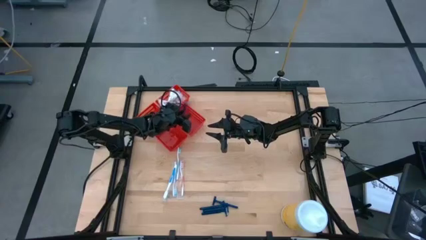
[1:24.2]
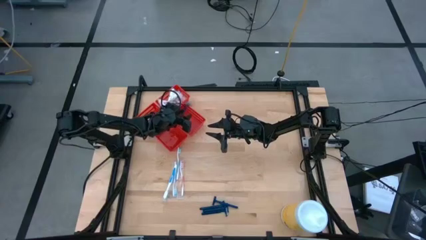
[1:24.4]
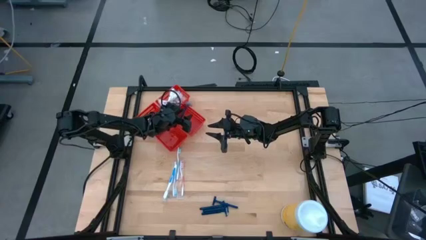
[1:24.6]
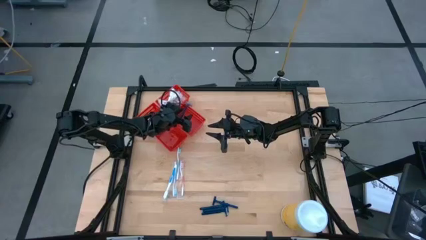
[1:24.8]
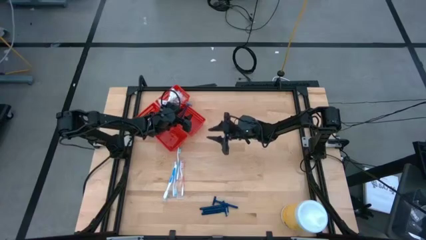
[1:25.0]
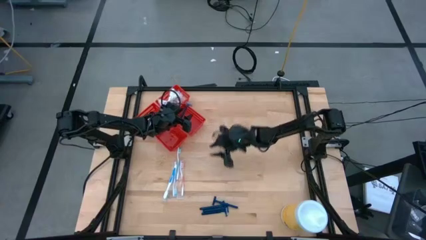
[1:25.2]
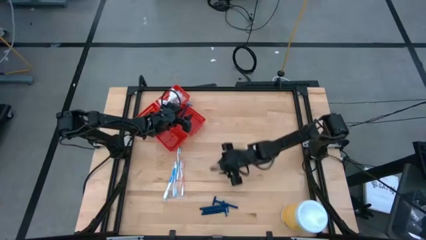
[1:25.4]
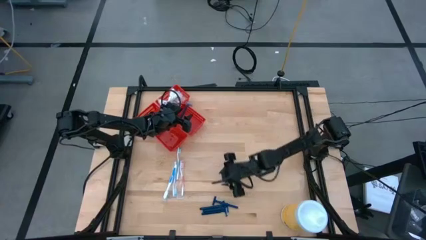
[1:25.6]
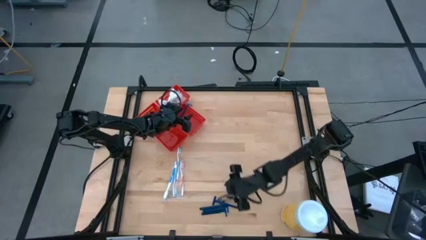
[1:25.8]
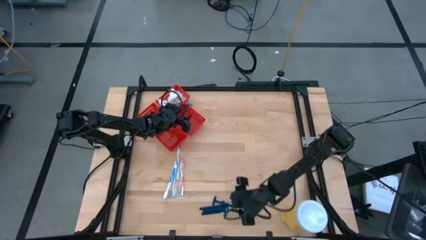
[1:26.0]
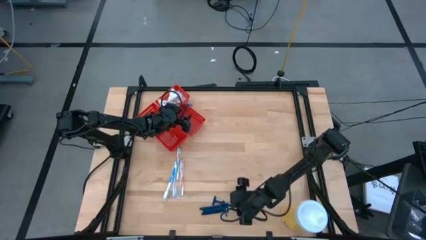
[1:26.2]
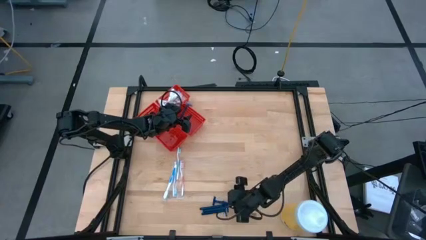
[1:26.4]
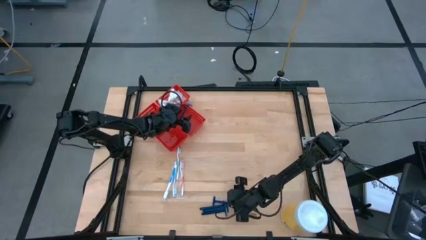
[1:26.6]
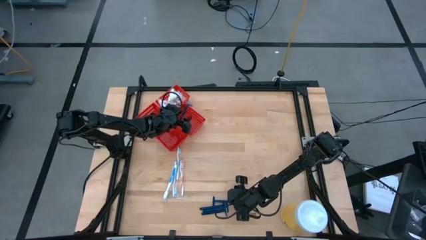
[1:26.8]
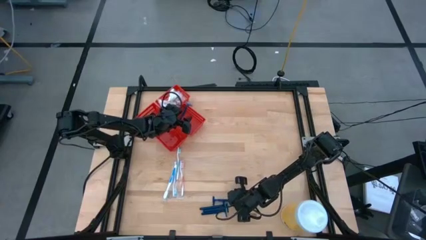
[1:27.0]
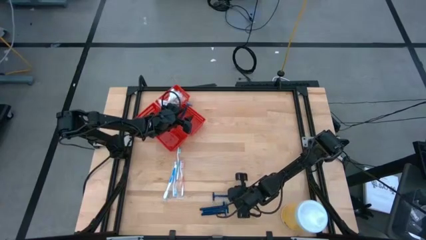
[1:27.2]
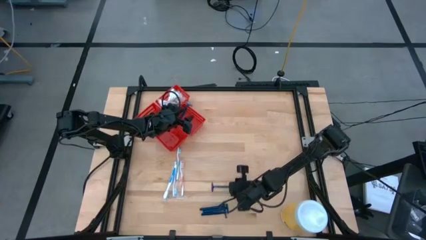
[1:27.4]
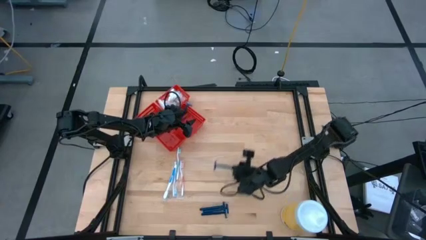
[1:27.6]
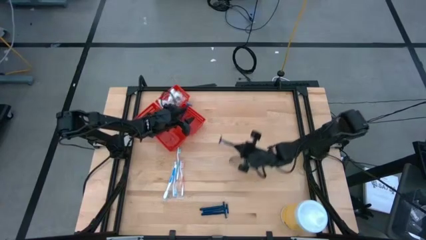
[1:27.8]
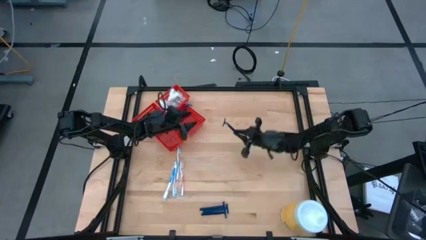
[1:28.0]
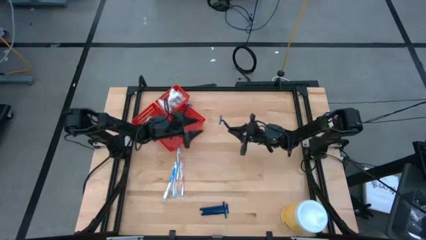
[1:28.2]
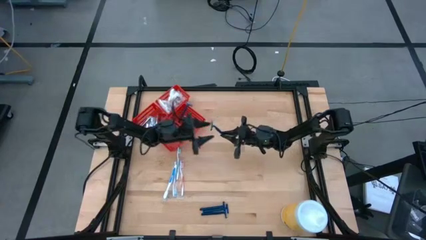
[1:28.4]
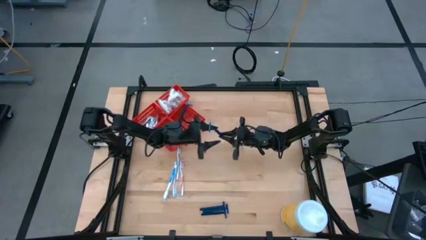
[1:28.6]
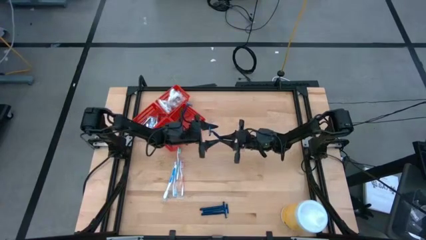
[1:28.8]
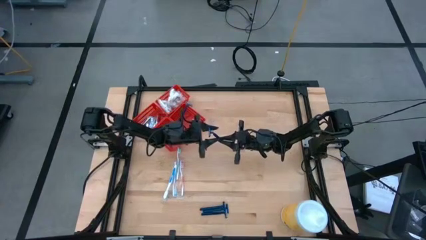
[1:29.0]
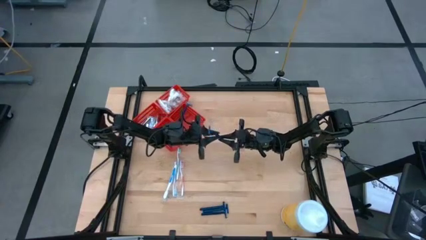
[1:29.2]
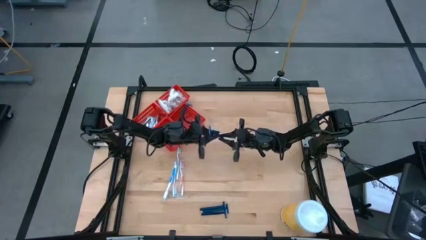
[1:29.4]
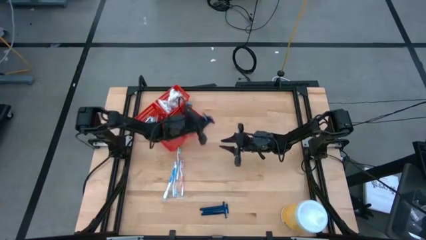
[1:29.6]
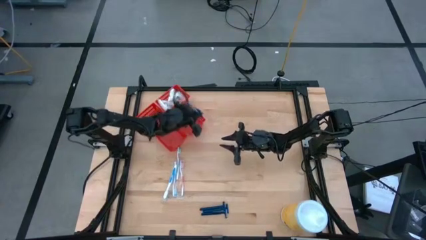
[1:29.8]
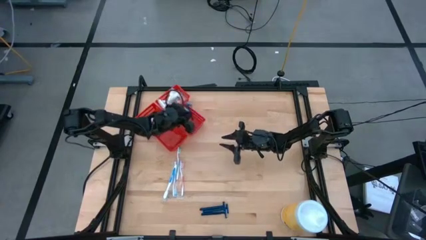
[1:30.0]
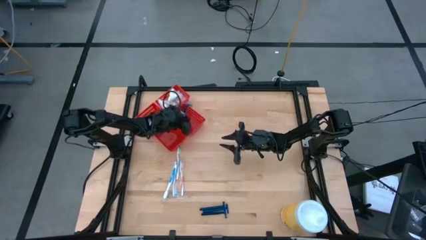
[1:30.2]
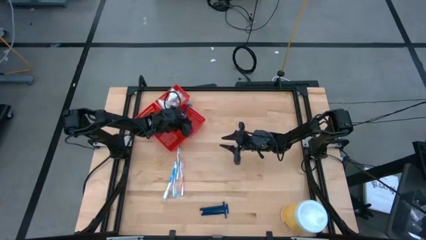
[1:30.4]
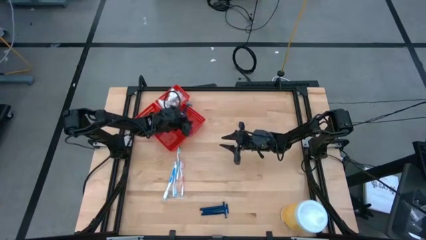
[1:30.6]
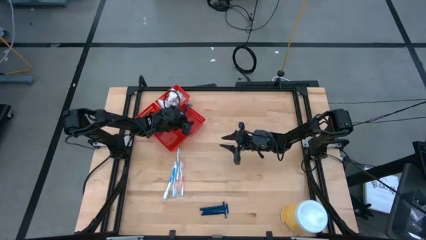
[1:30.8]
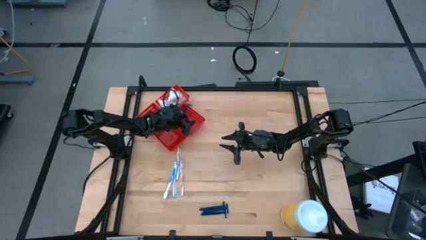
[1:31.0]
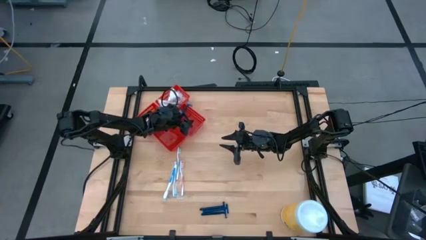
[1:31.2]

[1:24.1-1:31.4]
Task: Pick & Place Travel size toiletries
Put the blue razor into the vertical right red bin

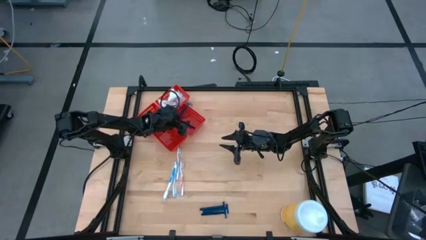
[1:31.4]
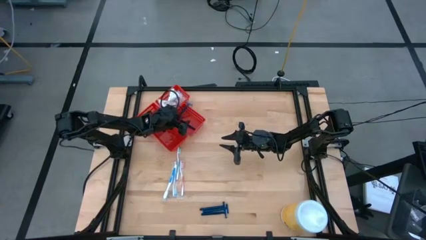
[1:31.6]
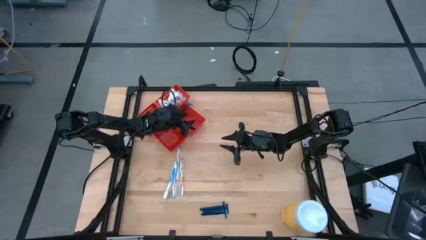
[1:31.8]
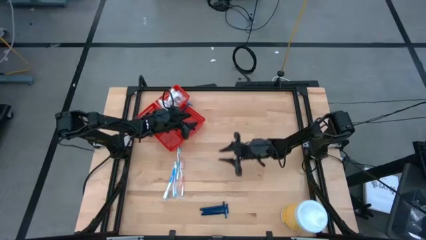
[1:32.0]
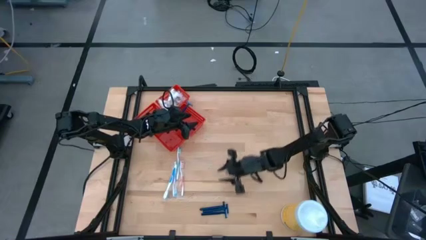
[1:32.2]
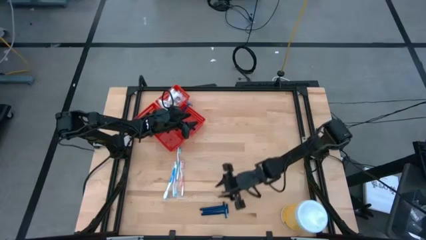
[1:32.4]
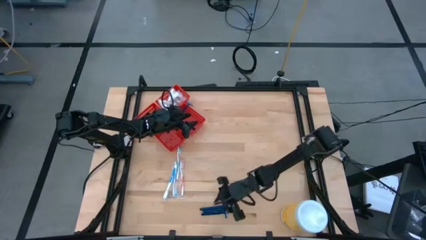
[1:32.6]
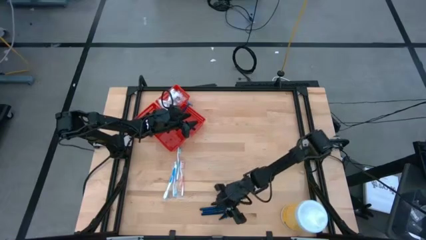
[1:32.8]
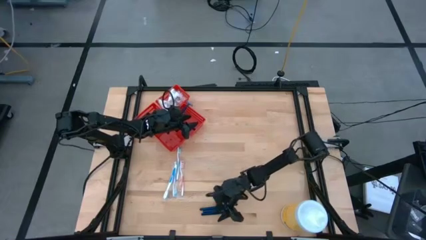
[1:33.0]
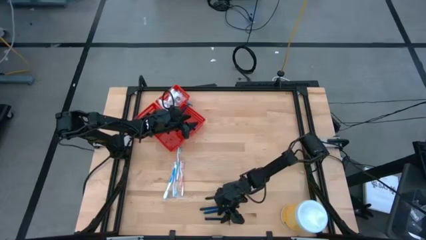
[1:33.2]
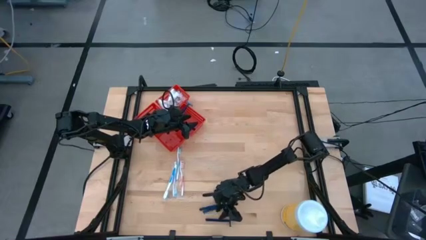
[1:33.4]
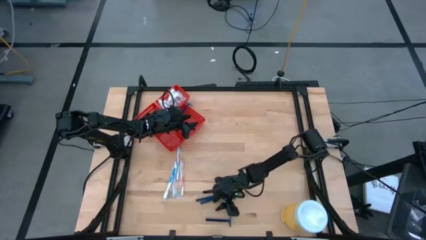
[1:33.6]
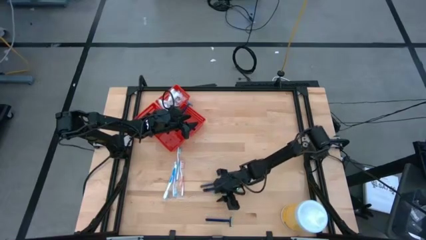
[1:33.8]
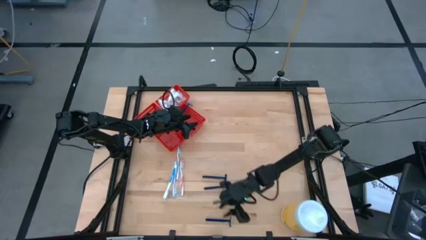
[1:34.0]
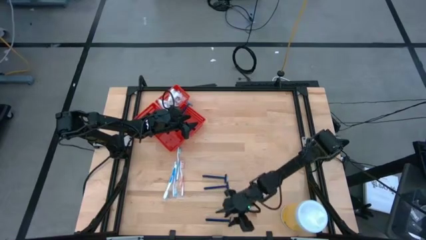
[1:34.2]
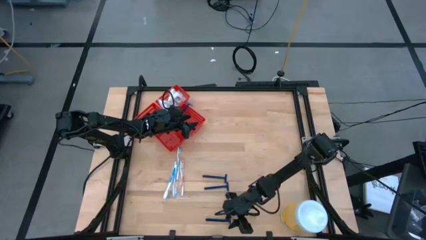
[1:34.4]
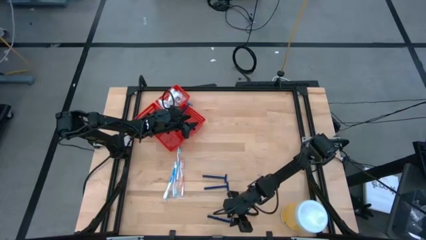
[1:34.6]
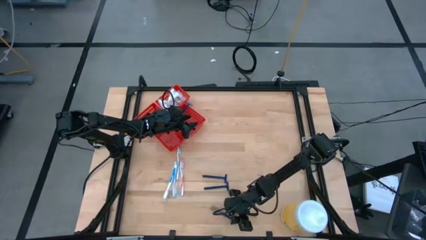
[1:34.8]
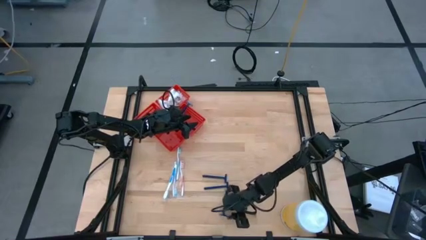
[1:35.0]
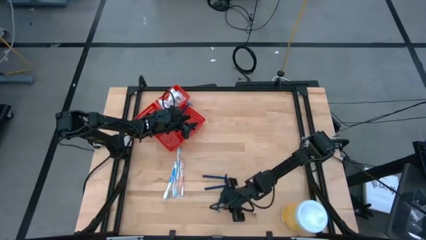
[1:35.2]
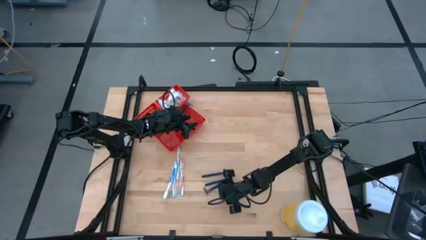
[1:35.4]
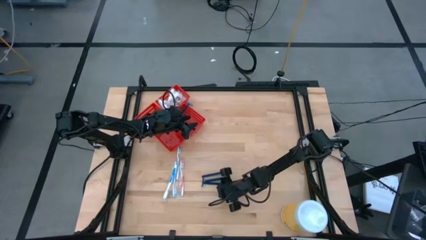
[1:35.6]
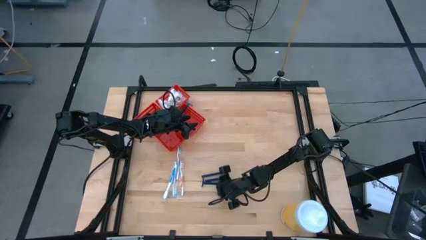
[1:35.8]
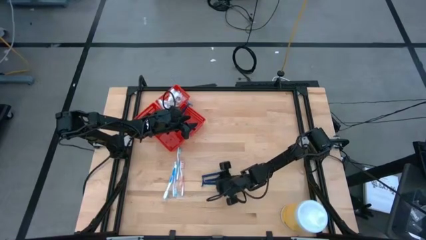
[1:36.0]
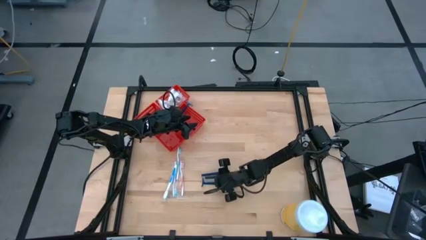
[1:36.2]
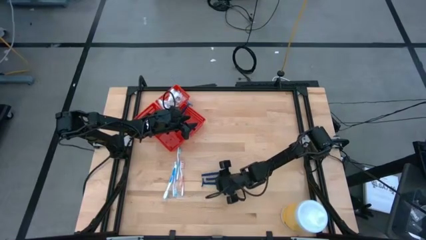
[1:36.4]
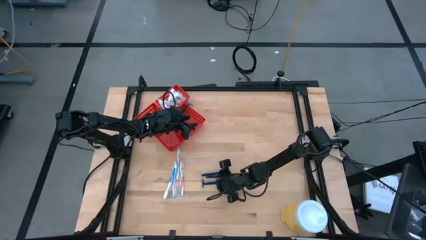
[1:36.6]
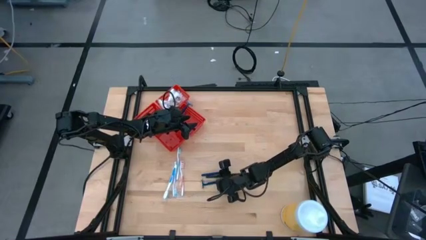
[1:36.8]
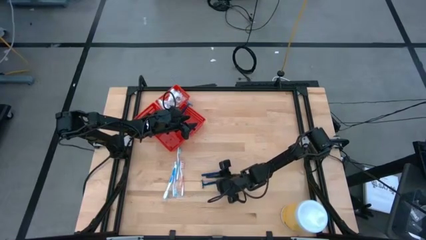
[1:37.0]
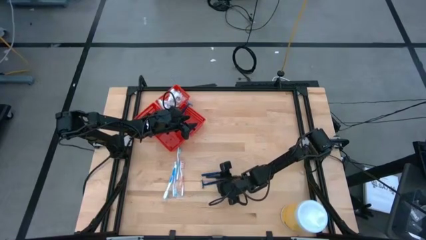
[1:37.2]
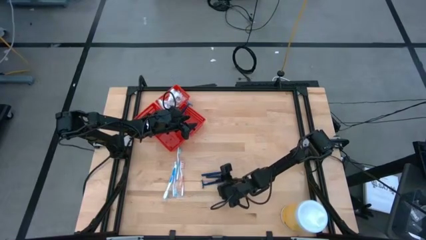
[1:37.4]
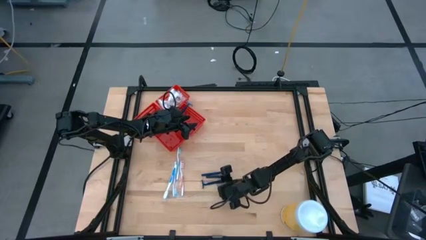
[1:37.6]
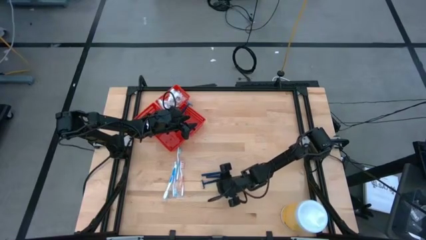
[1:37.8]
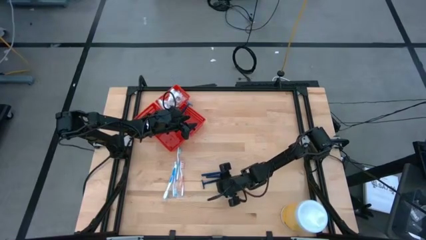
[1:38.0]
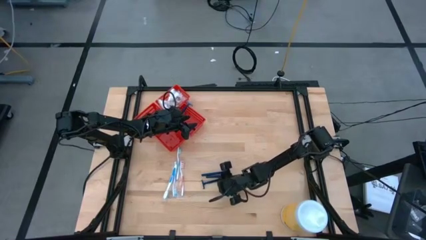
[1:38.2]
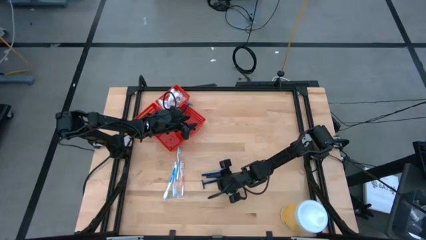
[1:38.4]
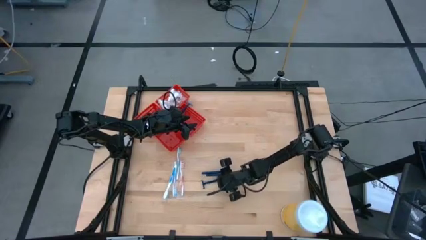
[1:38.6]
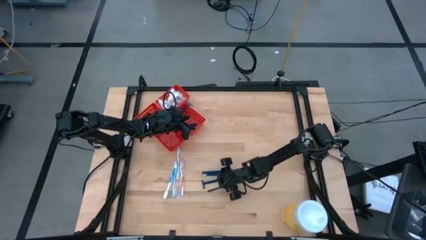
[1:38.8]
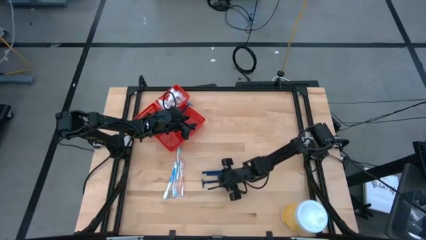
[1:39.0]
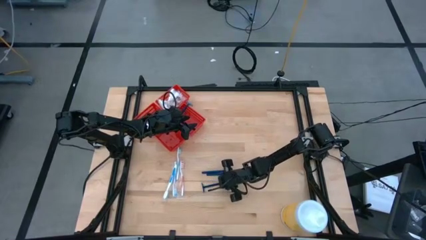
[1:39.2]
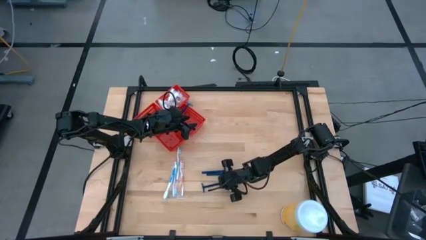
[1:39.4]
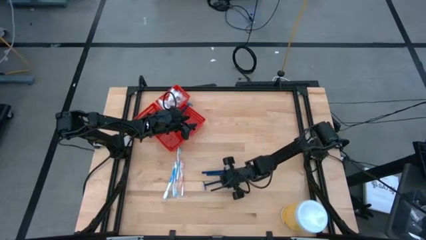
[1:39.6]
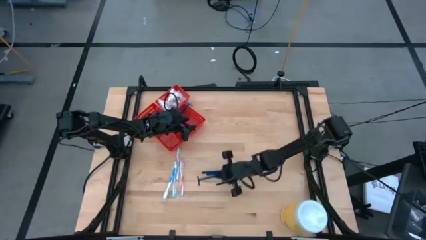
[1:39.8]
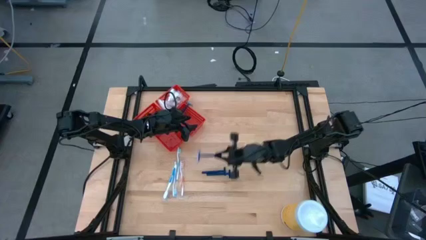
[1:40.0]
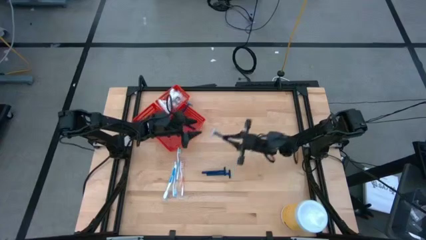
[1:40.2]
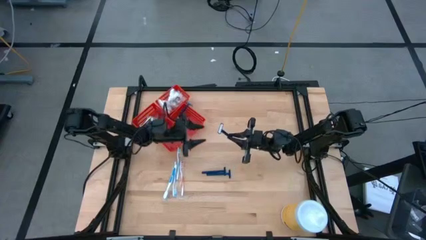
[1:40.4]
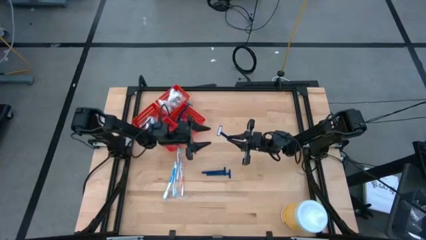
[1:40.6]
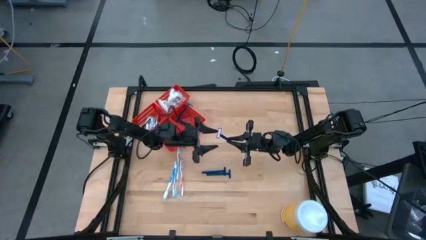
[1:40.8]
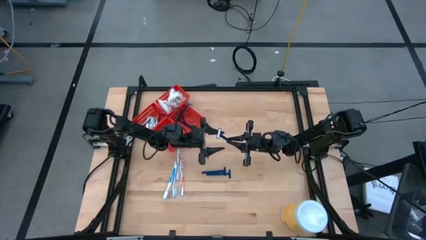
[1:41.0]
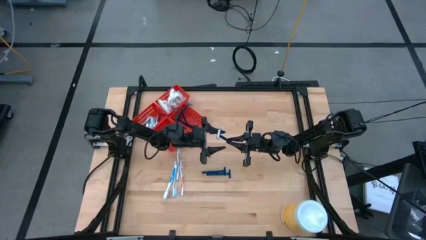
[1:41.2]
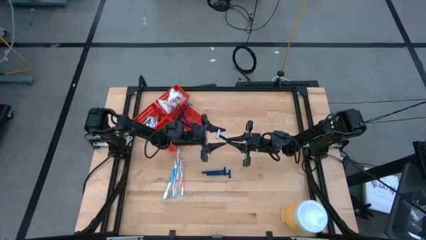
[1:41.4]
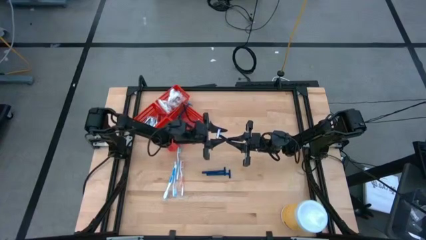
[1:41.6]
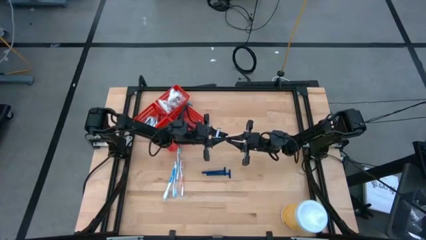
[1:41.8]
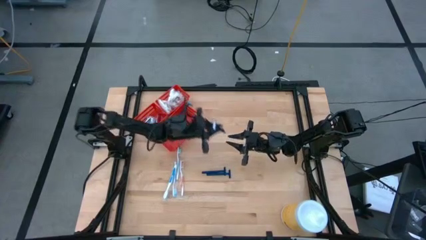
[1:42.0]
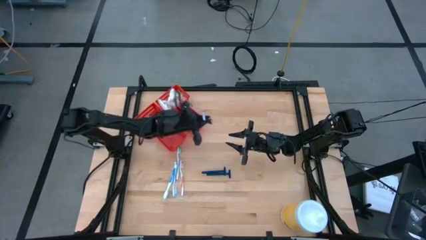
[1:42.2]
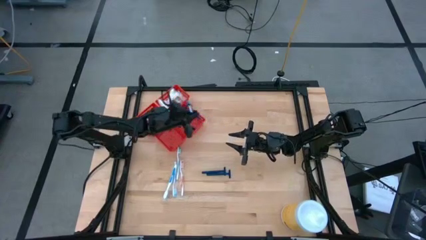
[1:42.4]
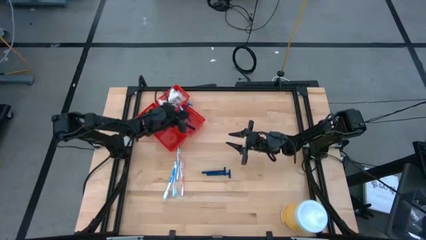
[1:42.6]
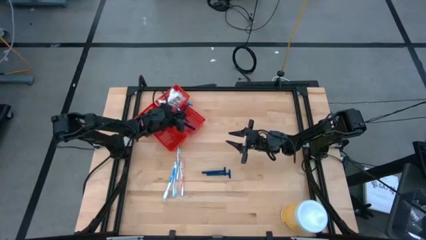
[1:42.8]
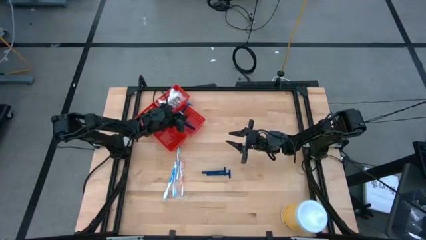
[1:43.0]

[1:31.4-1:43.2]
Put the bottom blue razor into the vertical right red bin
